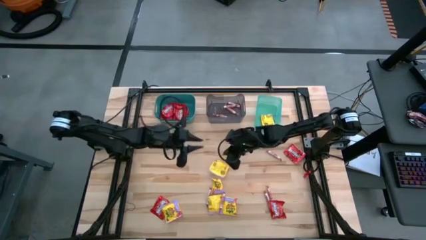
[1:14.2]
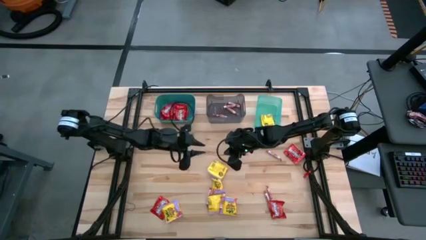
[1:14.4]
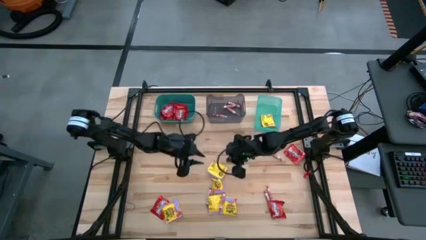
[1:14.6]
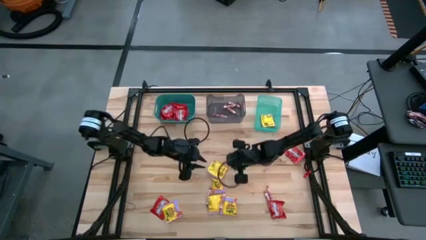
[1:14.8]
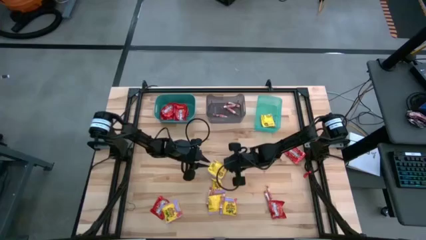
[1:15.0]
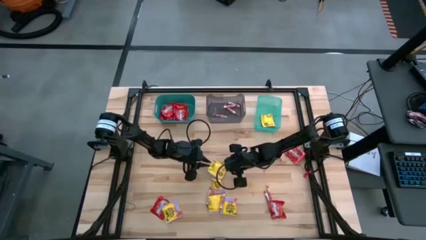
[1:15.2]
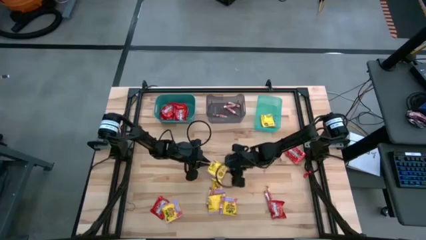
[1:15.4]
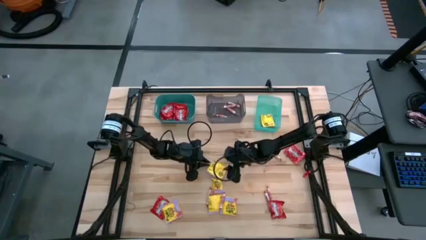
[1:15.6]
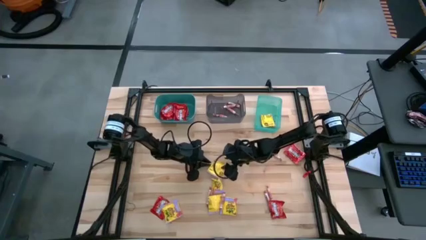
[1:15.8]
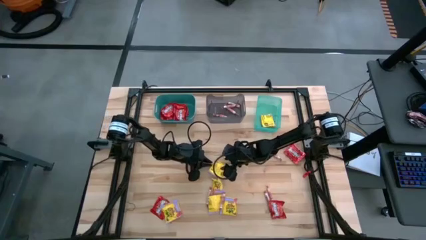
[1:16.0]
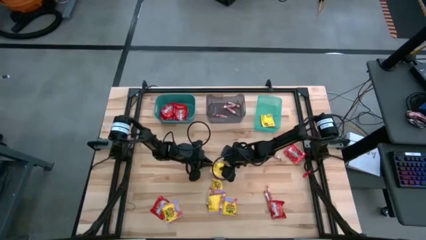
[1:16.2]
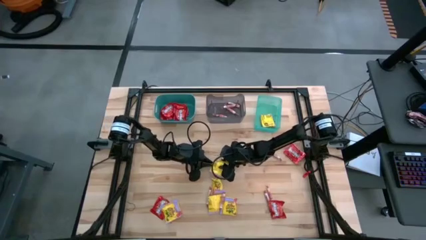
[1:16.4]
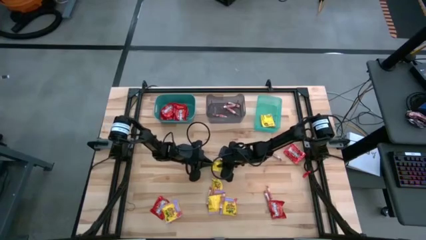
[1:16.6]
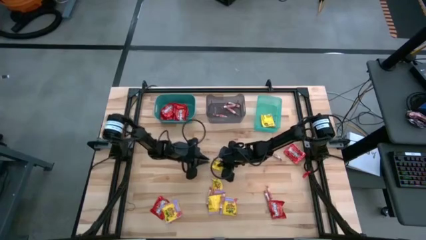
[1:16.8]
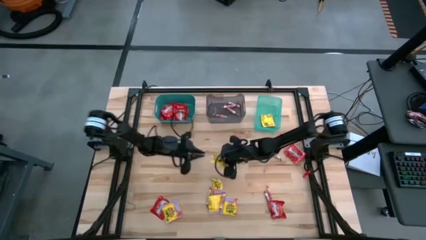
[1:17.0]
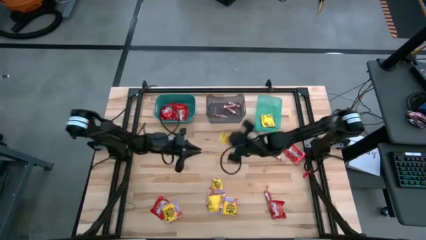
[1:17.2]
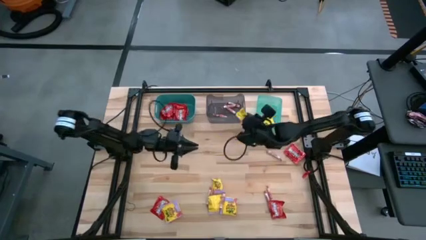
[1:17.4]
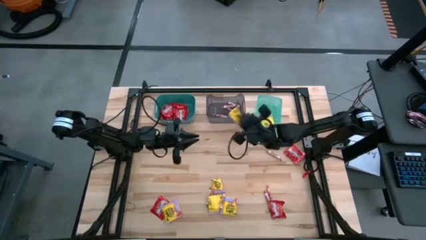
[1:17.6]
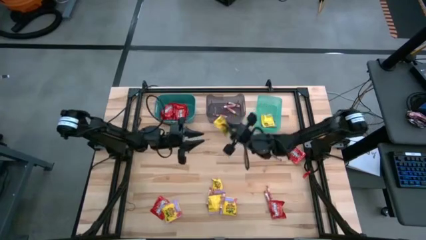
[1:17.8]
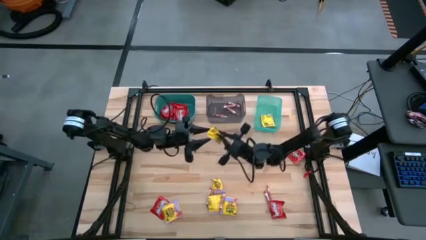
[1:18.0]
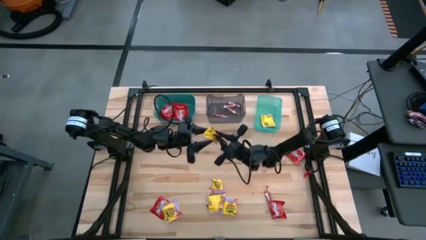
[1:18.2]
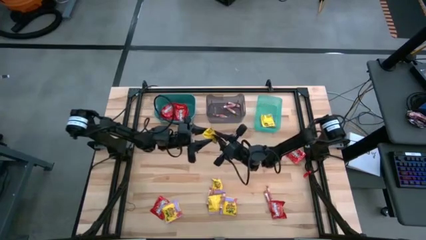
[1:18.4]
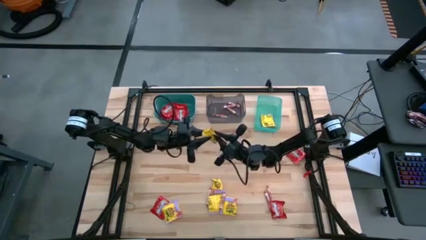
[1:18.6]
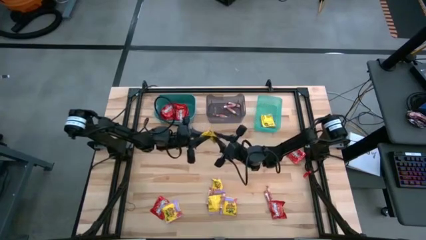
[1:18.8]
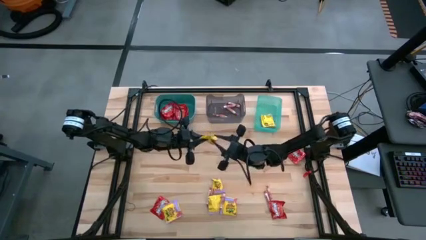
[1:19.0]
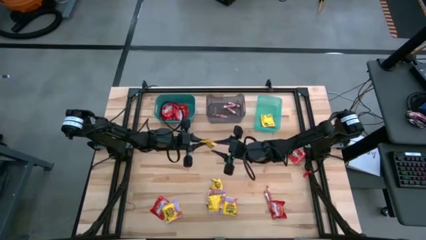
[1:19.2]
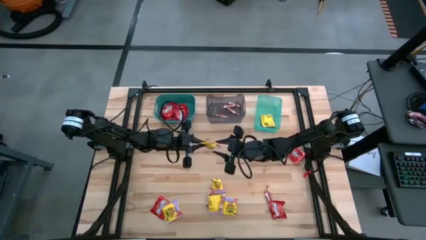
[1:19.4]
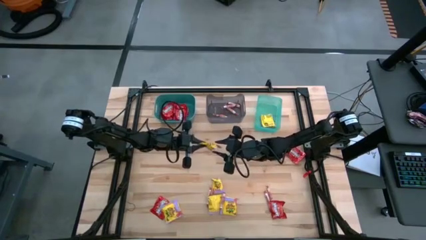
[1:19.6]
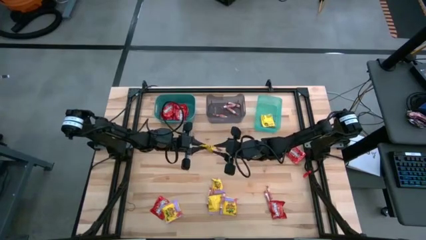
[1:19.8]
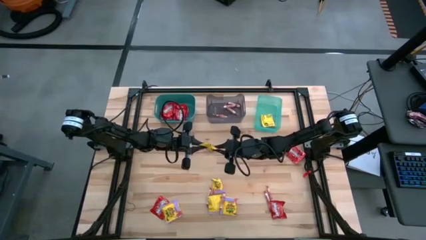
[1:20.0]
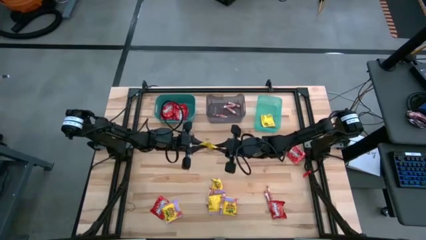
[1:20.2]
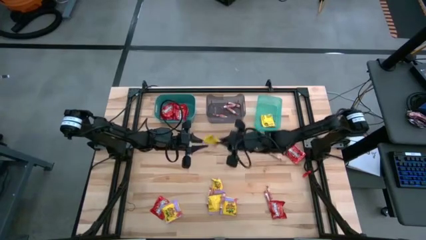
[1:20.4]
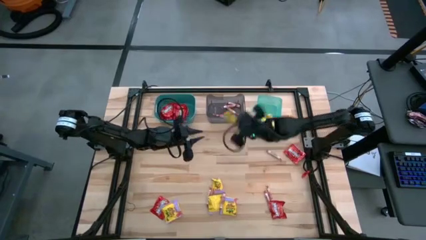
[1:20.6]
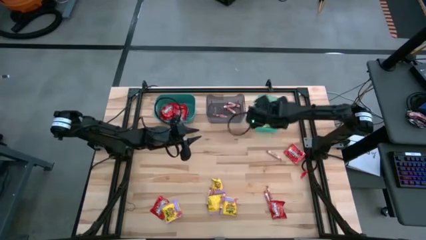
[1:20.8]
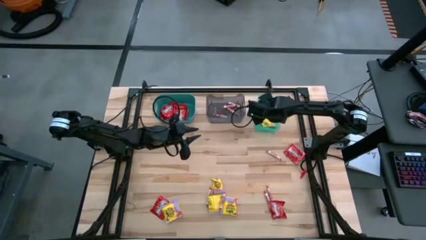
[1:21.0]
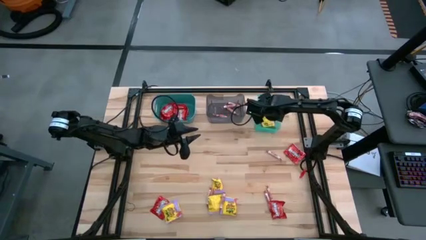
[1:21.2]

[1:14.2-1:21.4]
Task: Sort candy
Put the yellow candy into the light green bin

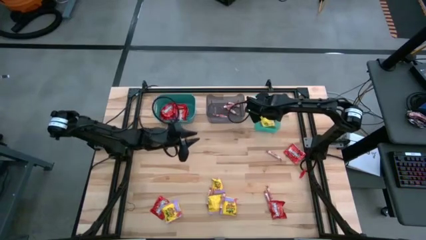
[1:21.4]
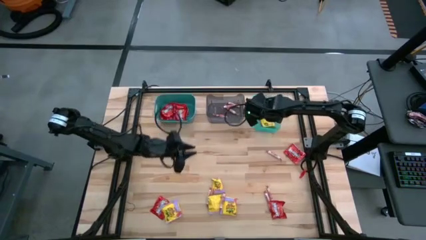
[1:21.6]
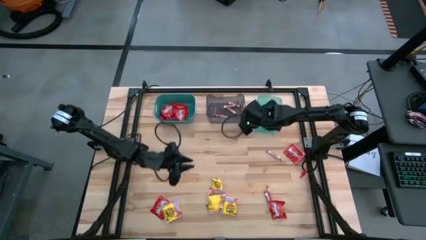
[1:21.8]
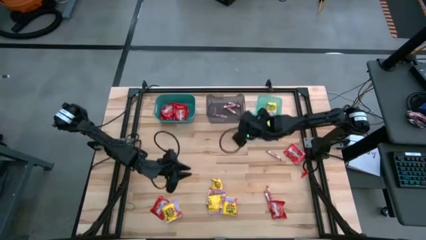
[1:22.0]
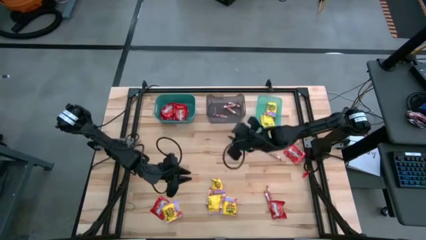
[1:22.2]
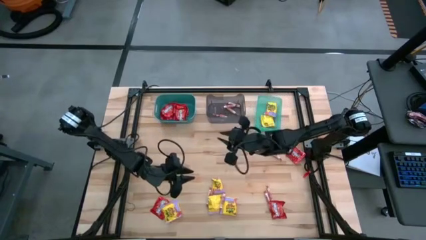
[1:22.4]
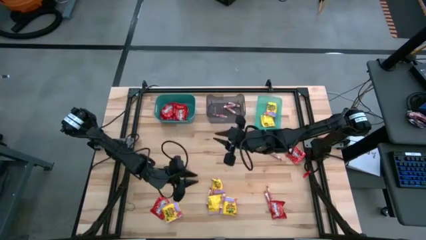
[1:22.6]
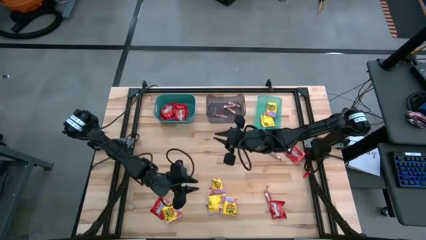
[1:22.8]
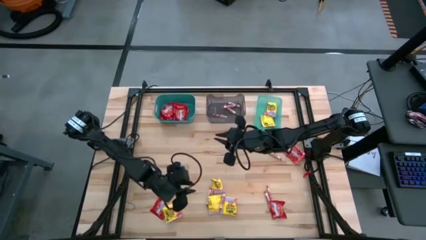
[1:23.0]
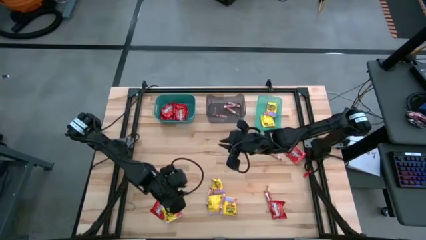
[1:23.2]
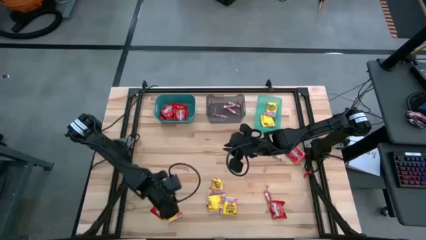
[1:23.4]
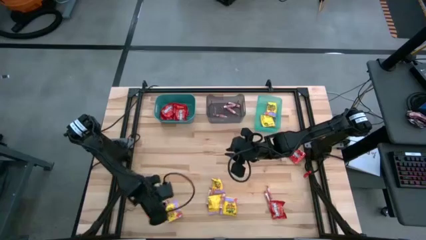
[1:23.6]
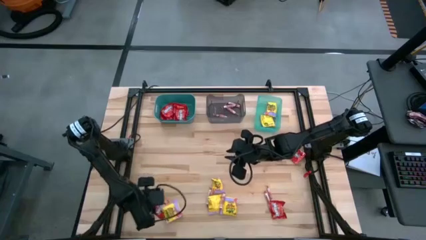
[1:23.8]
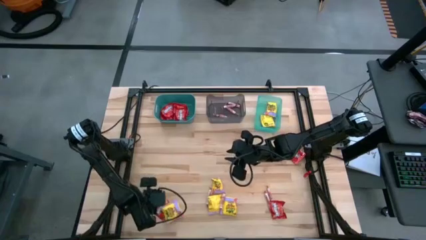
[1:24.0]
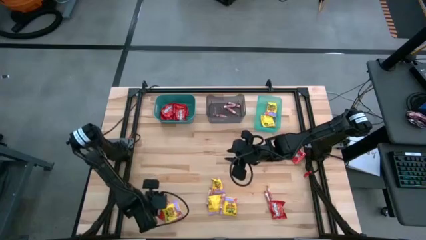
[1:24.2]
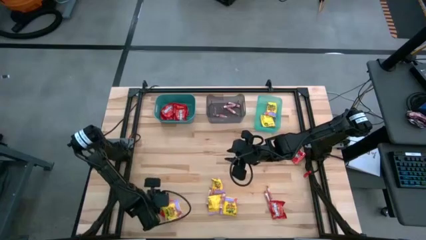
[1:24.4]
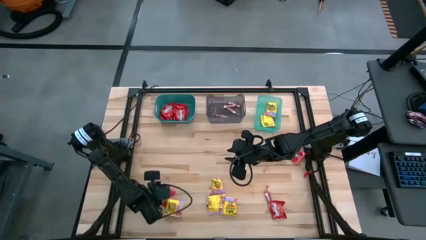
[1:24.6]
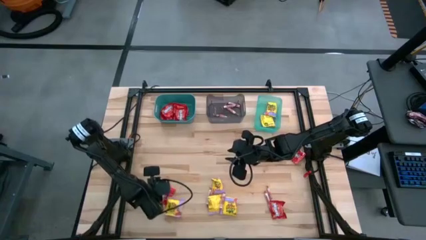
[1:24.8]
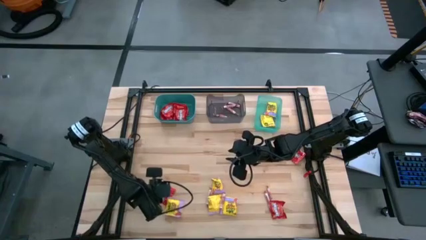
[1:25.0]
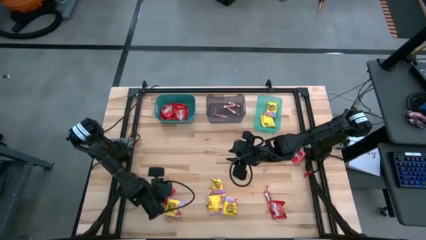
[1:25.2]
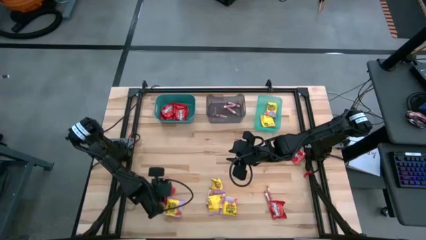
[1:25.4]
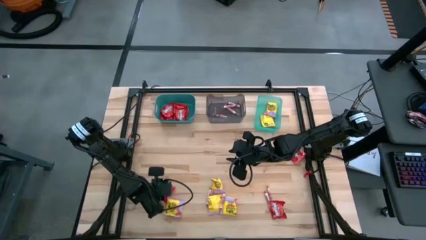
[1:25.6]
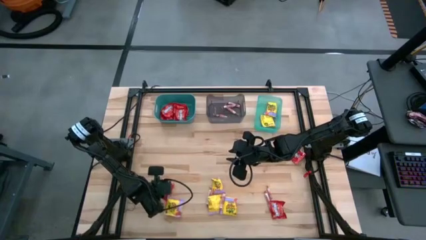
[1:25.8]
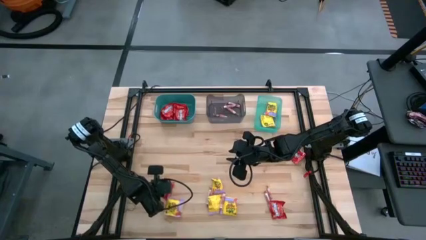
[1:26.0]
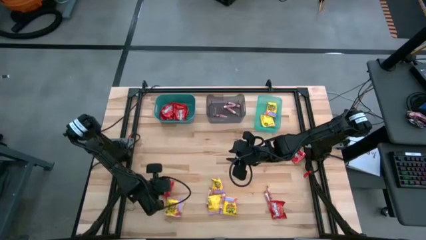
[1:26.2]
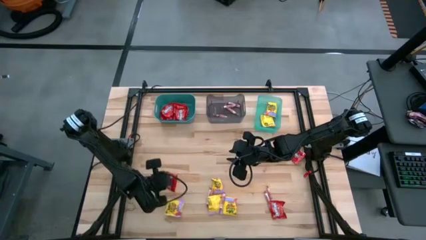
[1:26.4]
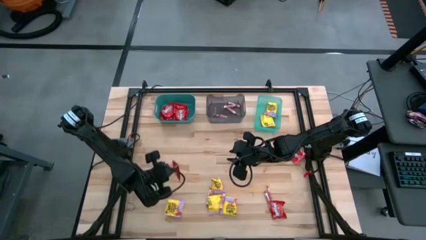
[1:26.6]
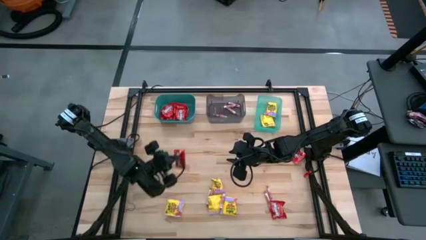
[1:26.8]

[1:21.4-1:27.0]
Put the red candy into the green bin

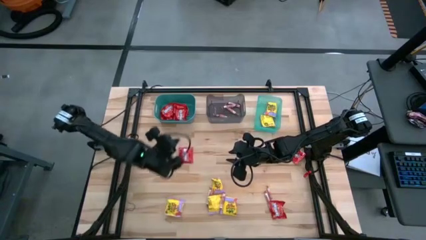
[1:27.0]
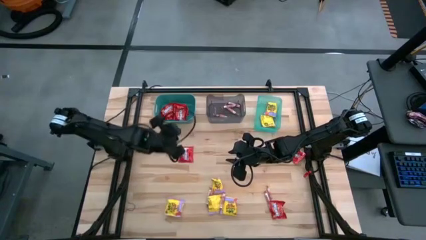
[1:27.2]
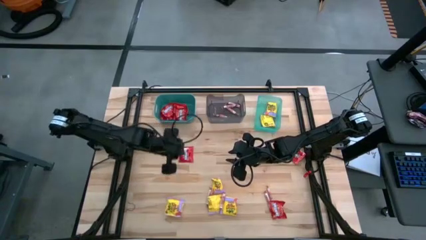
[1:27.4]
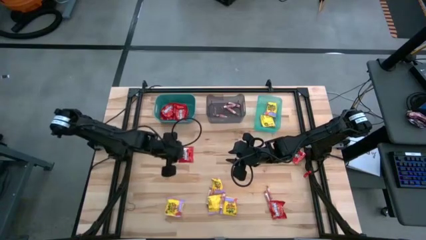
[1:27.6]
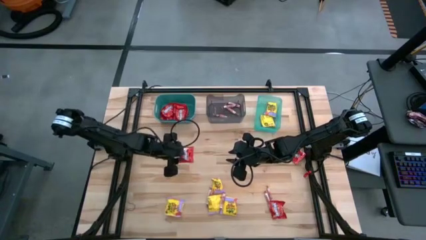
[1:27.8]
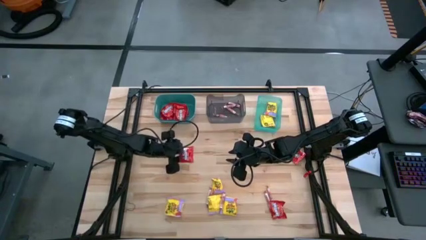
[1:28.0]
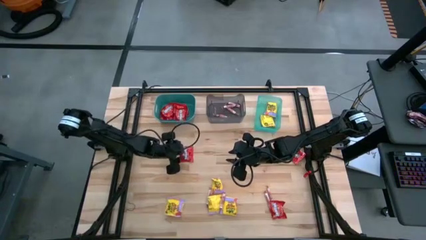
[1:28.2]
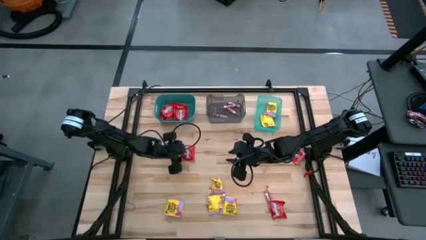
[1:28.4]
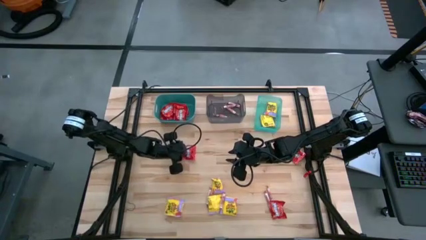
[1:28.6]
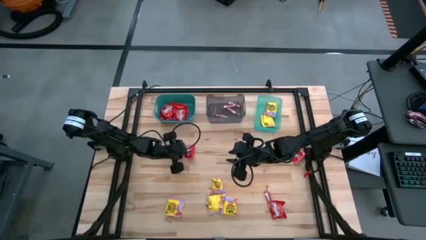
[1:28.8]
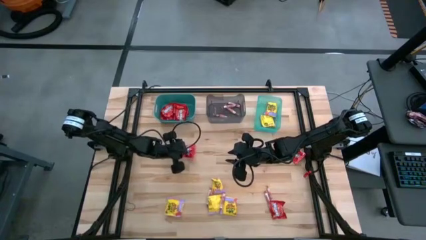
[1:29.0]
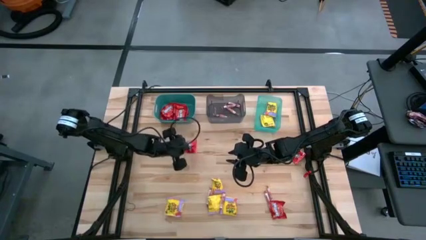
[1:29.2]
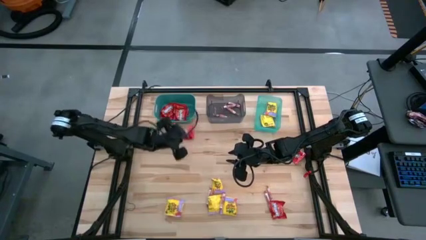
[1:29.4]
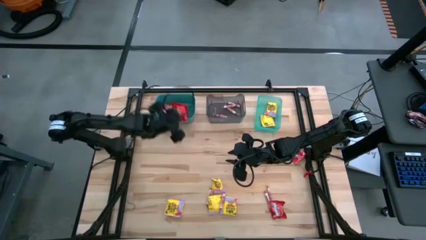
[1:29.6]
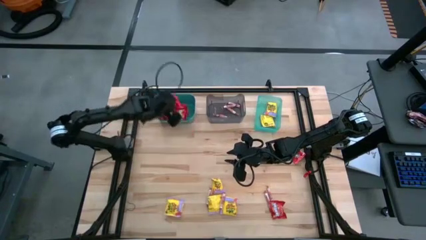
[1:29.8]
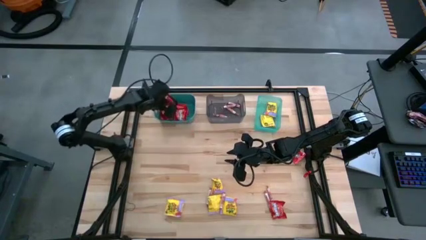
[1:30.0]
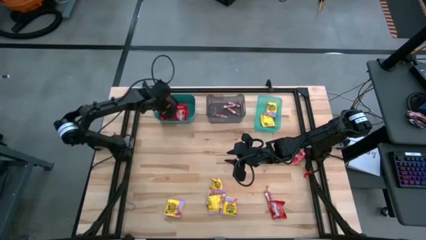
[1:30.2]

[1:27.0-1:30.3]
Put the red candy into the green bin

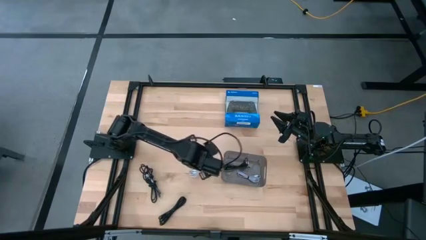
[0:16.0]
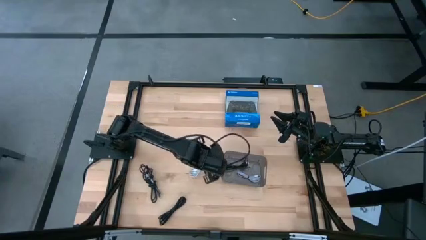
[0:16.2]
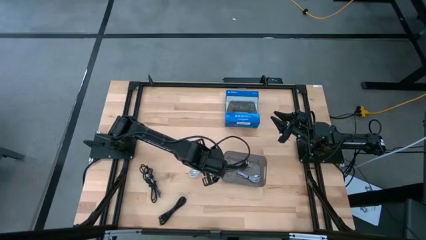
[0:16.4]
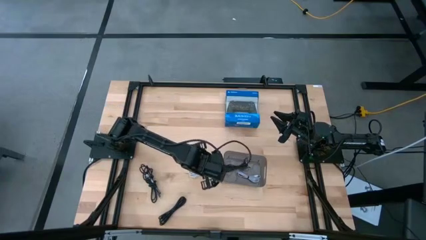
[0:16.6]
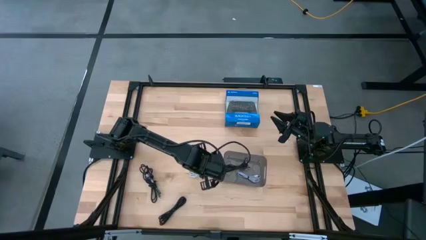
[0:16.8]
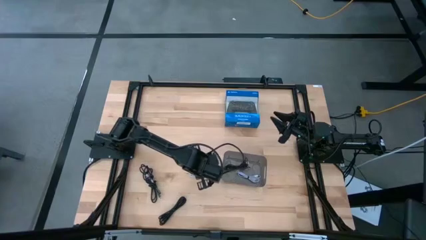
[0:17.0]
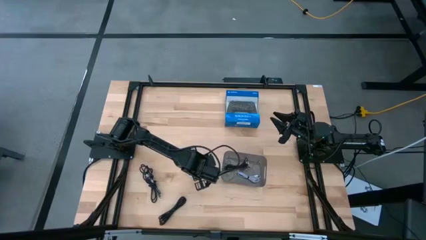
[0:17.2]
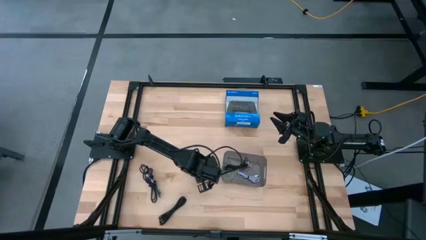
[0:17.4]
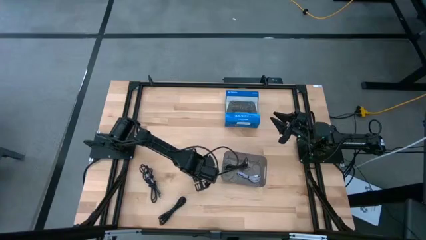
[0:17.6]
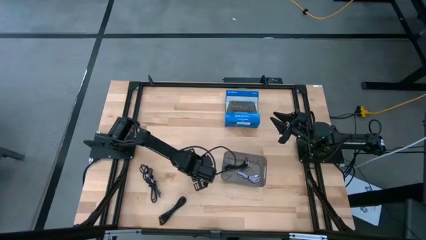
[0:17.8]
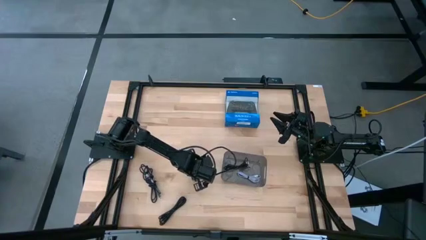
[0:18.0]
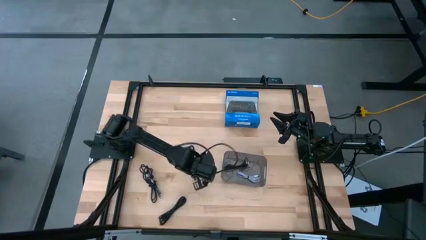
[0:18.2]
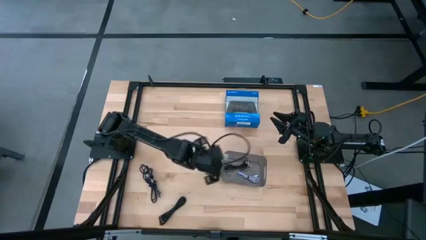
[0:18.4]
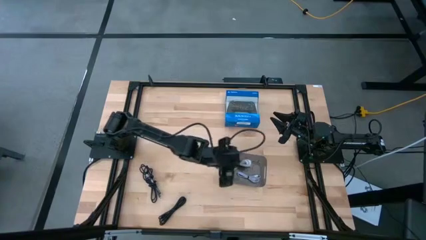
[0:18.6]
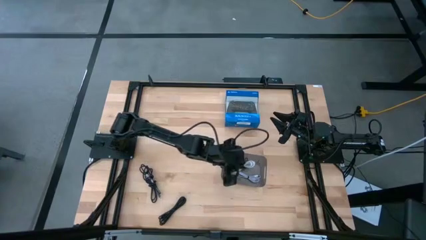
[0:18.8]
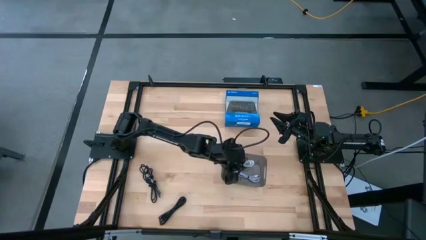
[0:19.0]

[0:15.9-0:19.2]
Task: Pick and place USB-C Cables
Put the white charger cable into the black bin
